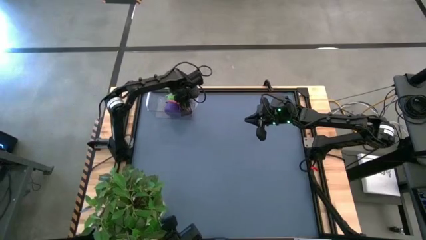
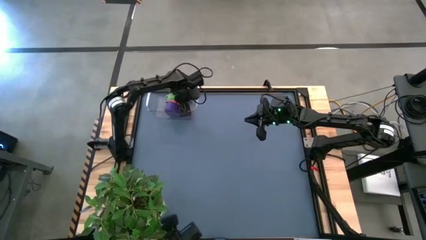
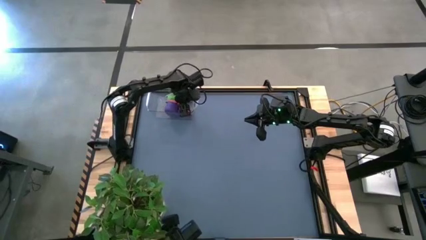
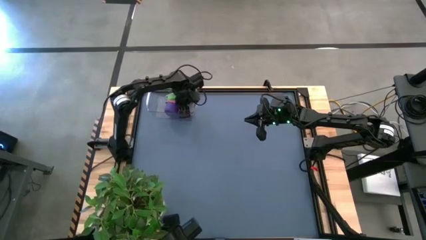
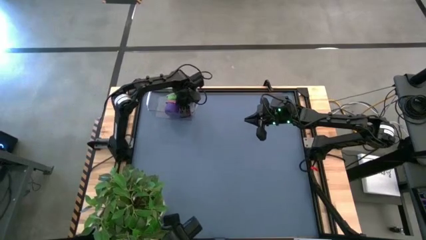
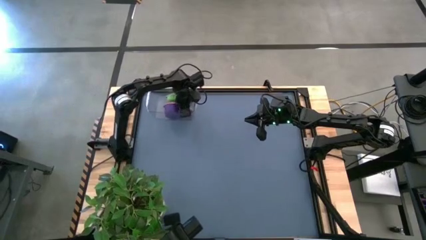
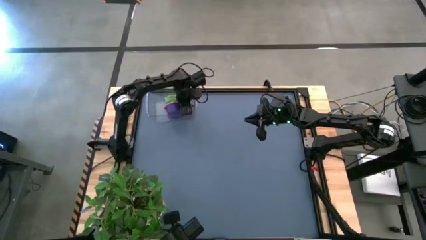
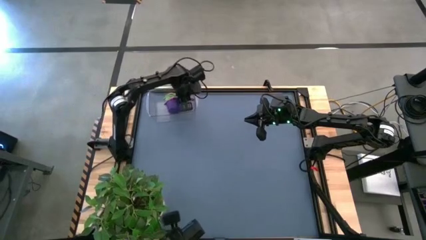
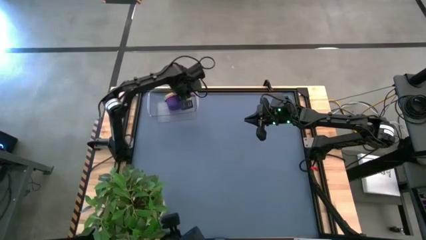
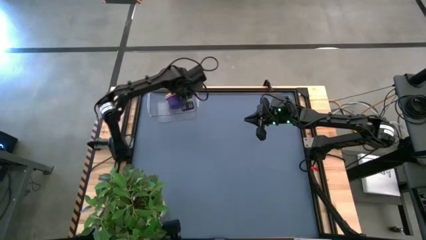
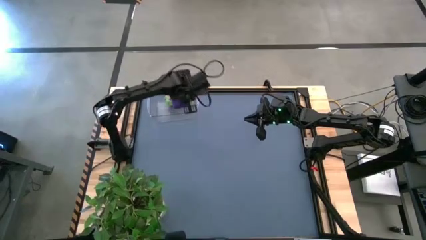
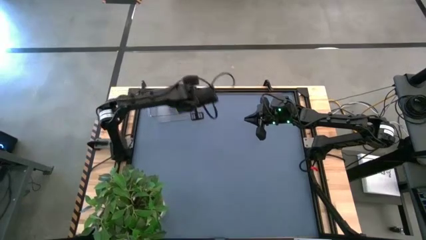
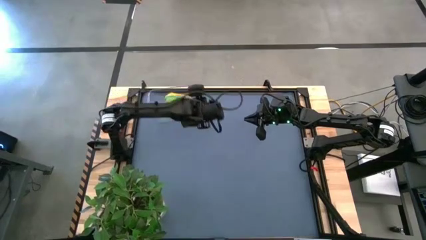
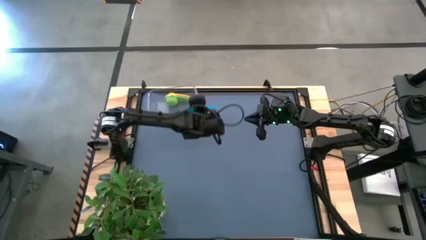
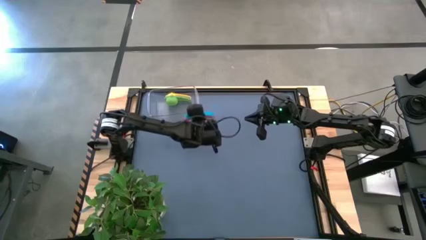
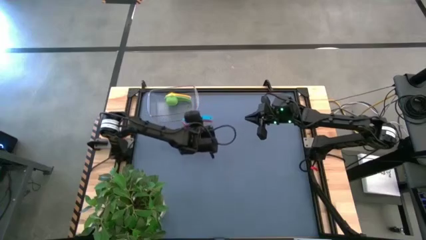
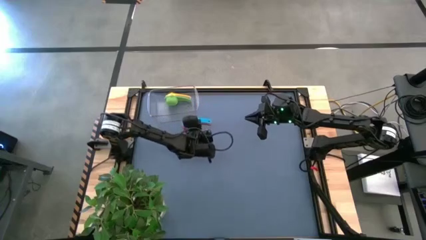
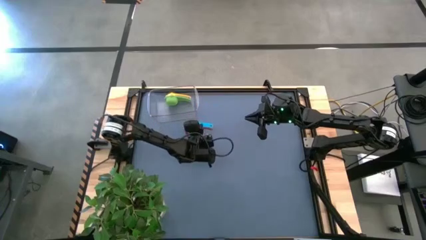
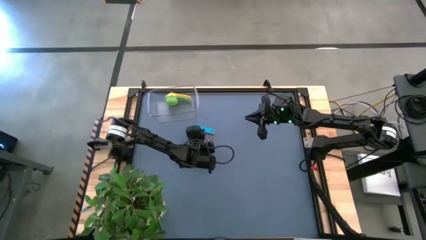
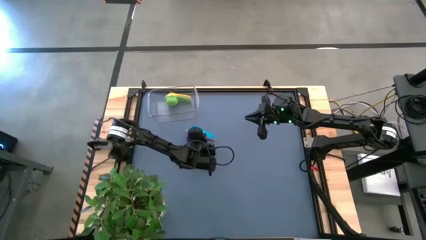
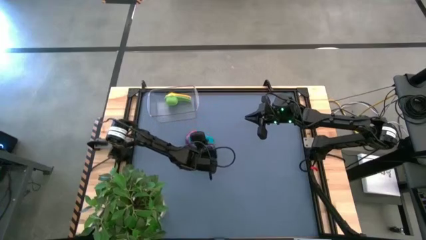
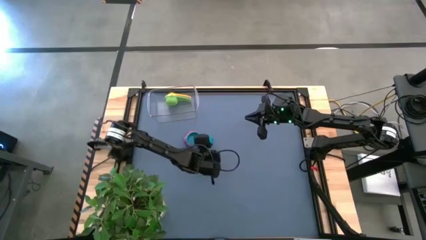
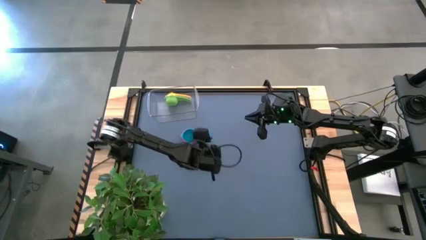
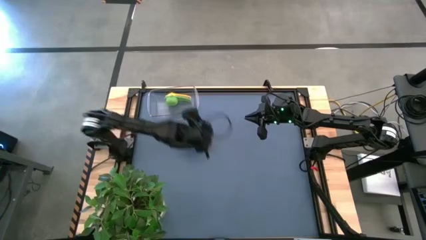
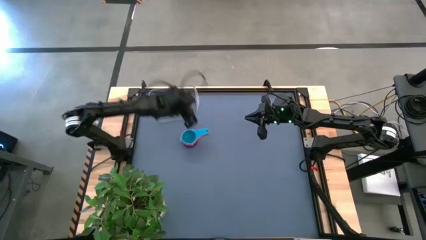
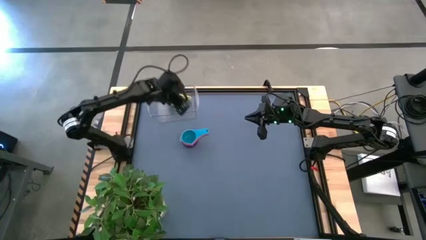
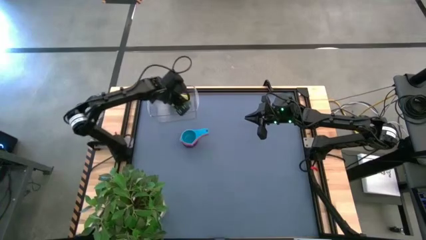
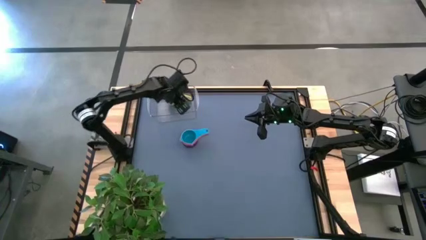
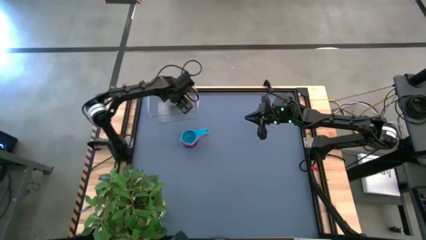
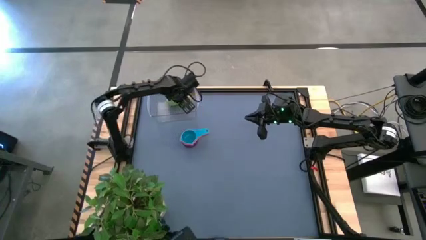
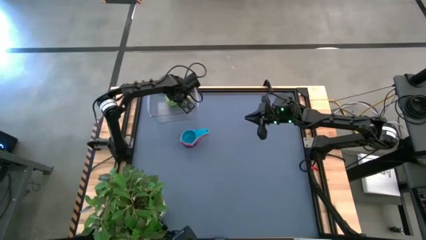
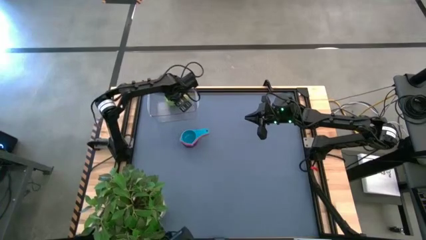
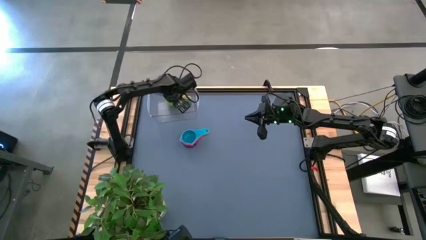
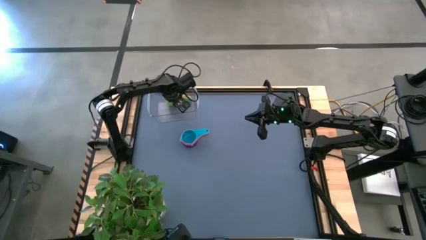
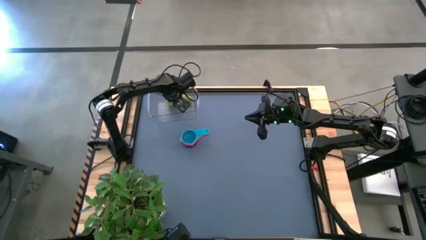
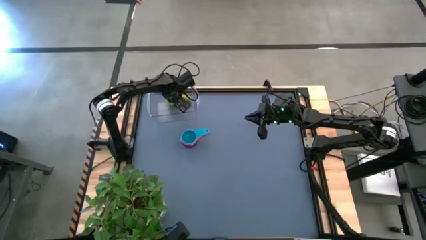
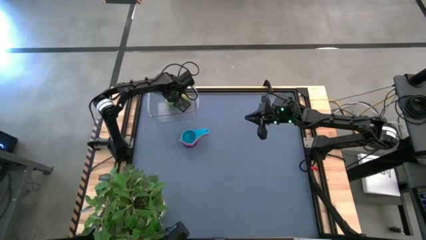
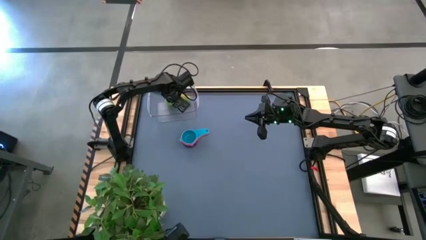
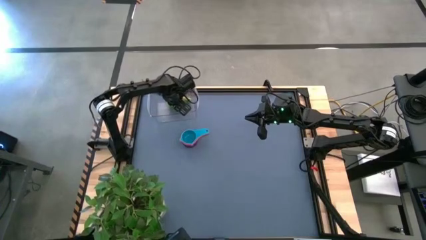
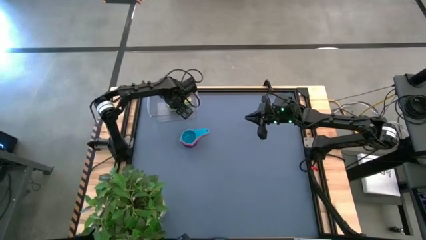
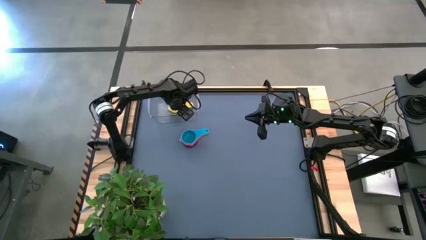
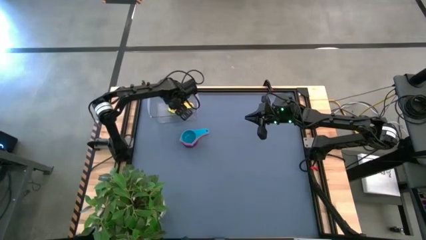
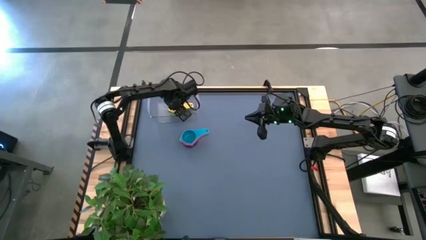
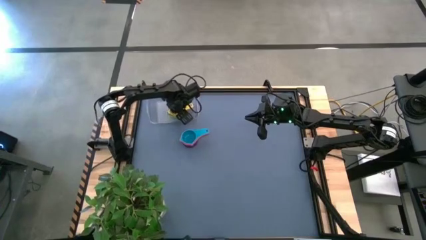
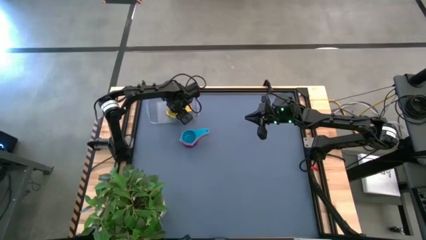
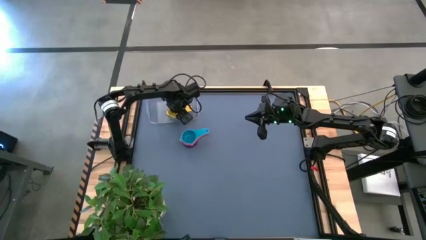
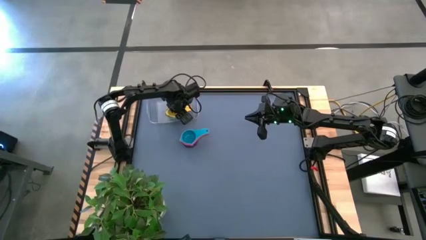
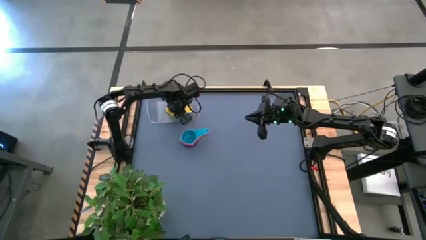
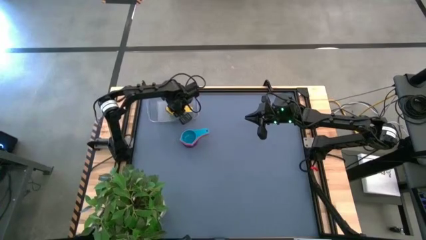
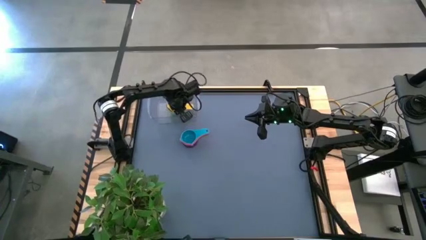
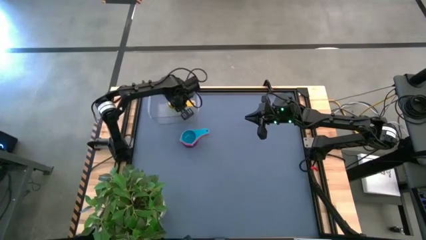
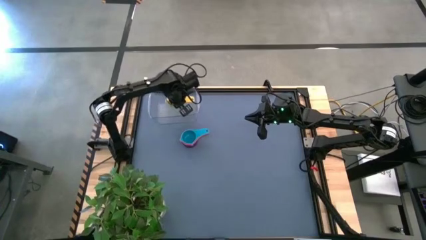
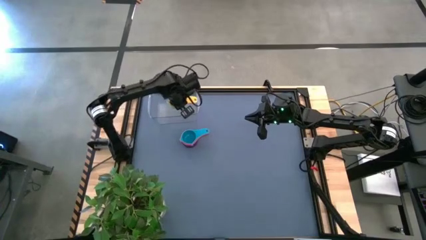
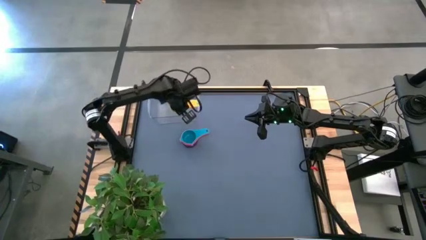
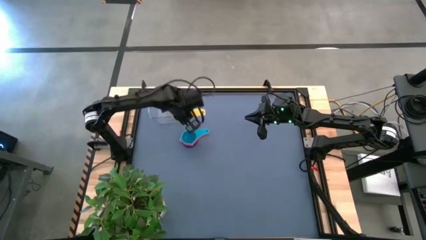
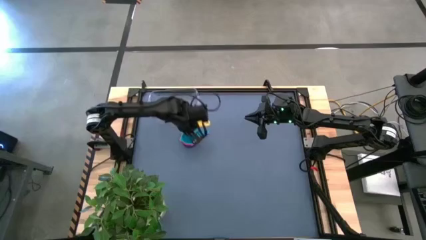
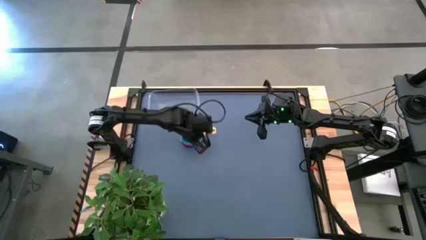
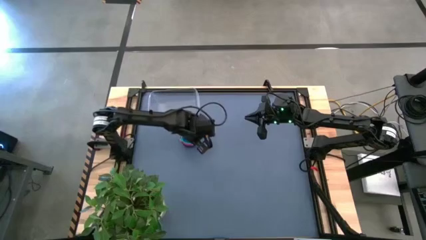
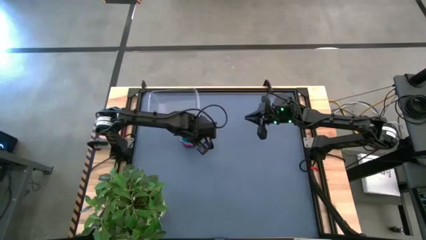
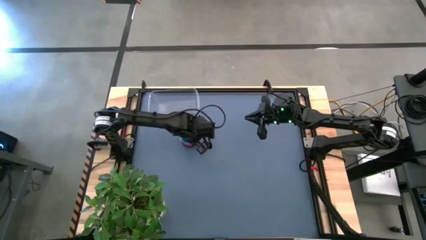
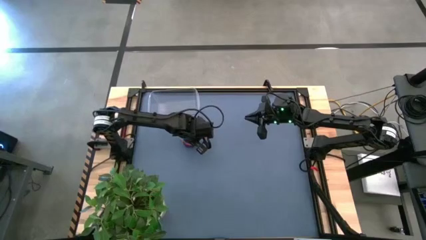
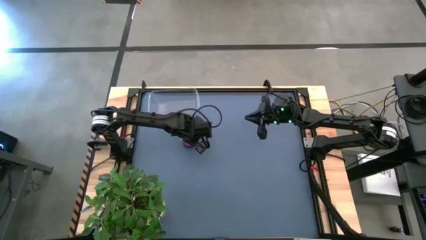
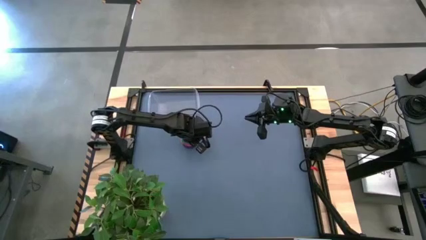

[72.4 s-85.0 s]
Task: Nest measuring cups in basket
Remove the nested measuring cups from the transparent bin
